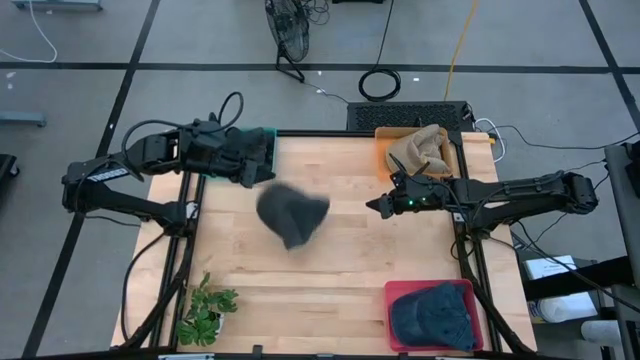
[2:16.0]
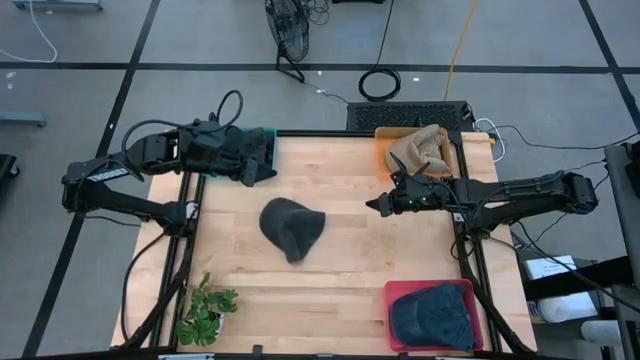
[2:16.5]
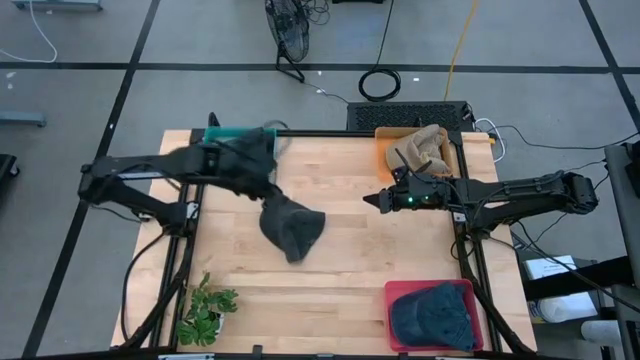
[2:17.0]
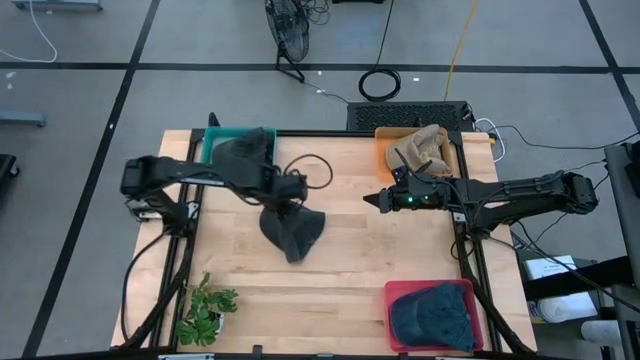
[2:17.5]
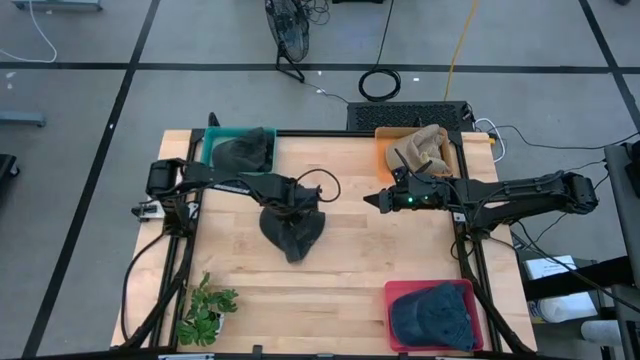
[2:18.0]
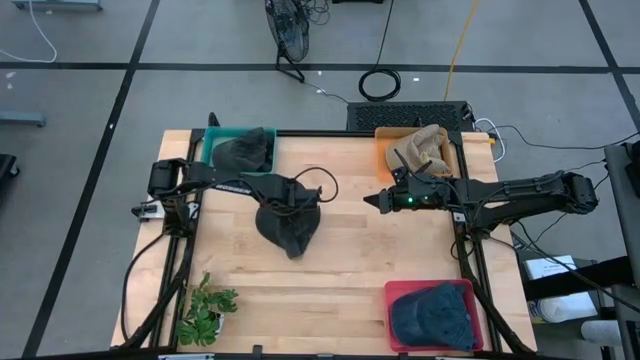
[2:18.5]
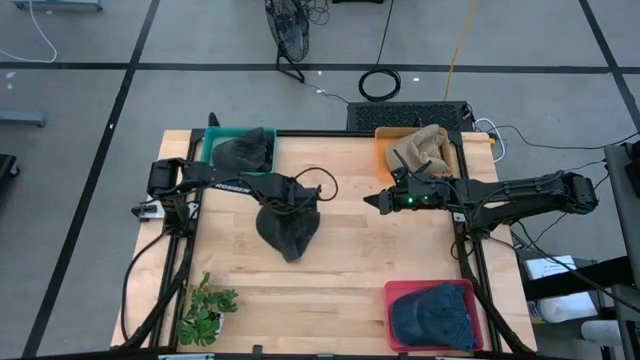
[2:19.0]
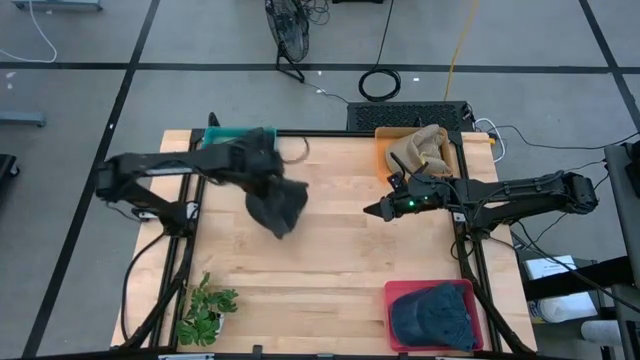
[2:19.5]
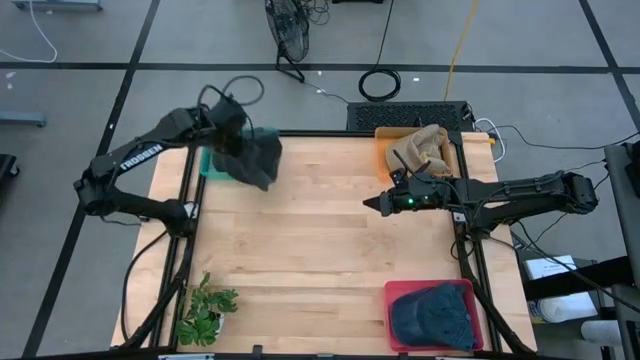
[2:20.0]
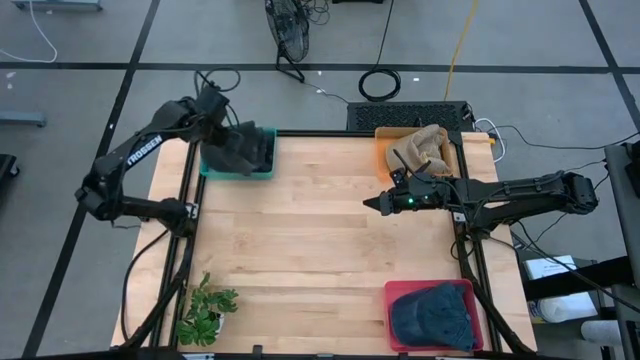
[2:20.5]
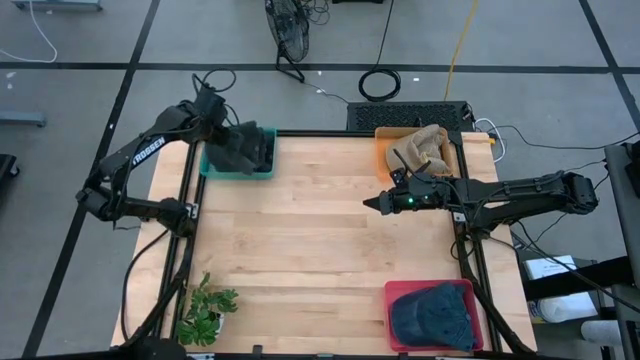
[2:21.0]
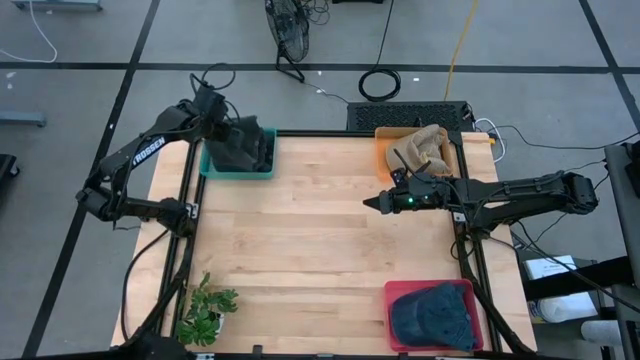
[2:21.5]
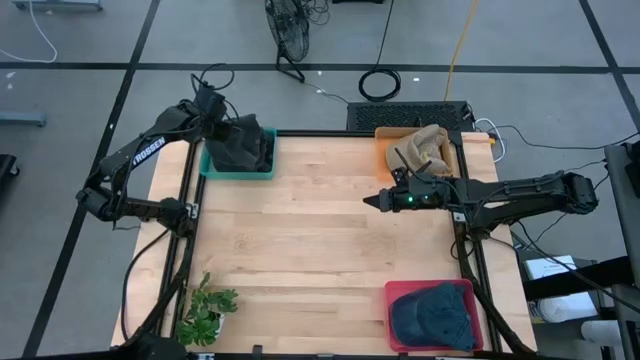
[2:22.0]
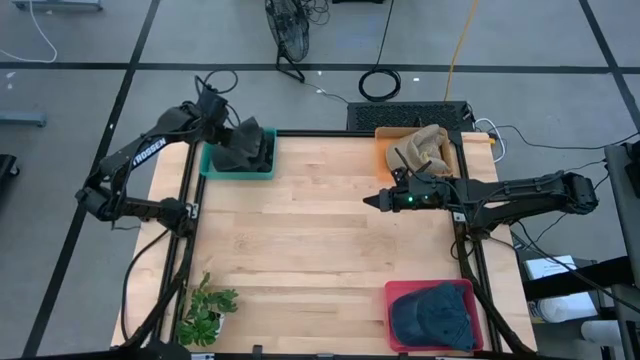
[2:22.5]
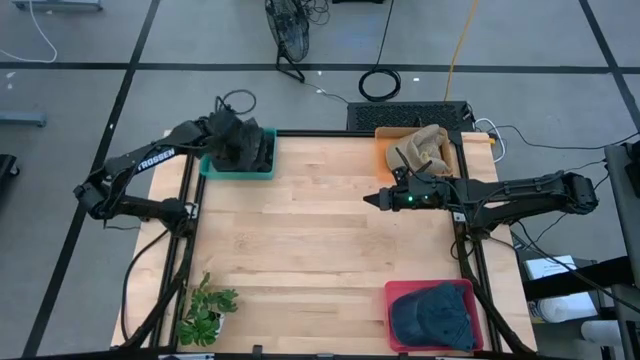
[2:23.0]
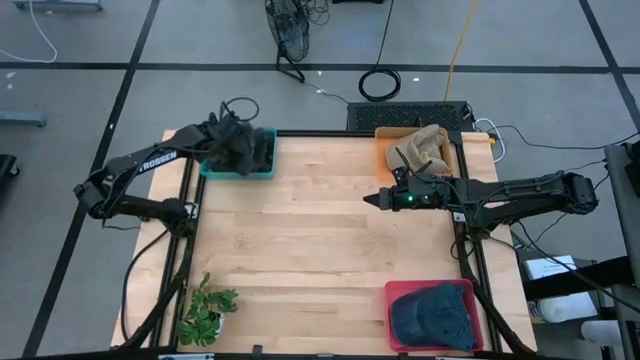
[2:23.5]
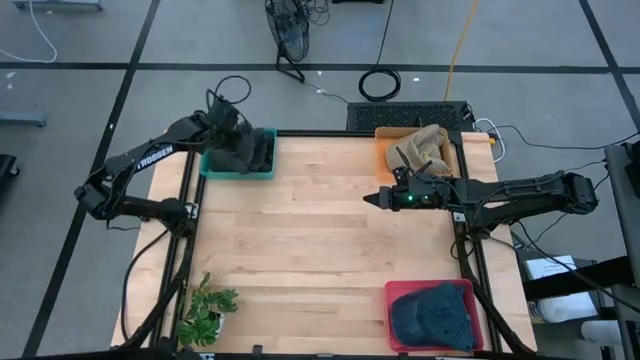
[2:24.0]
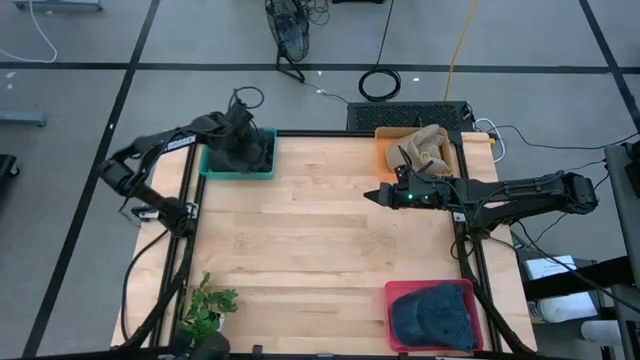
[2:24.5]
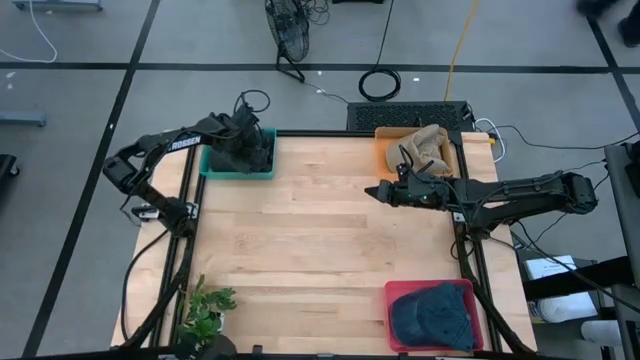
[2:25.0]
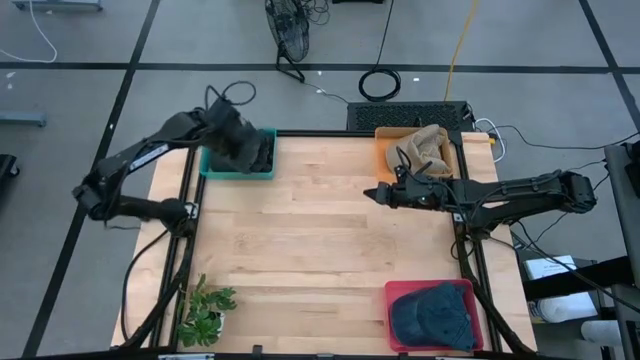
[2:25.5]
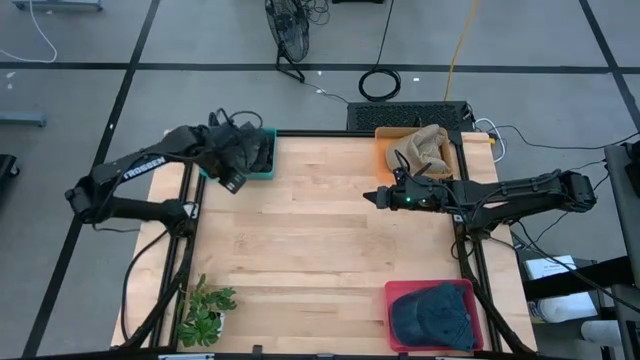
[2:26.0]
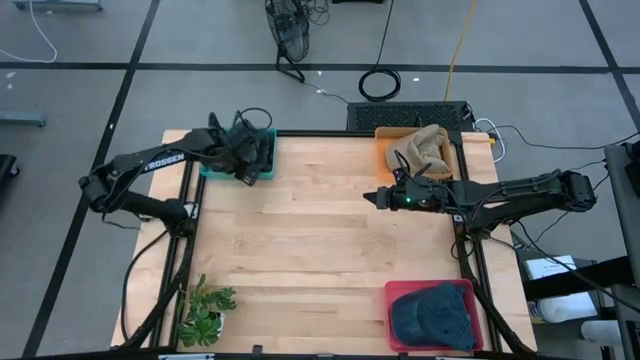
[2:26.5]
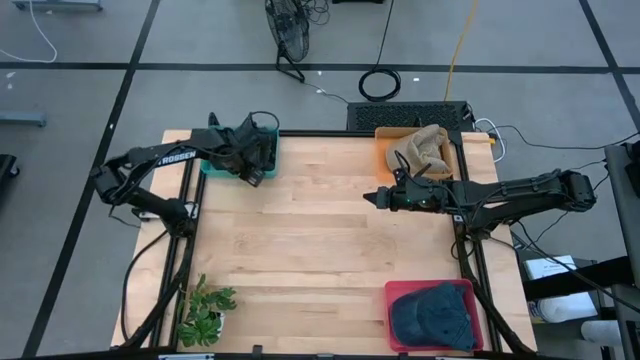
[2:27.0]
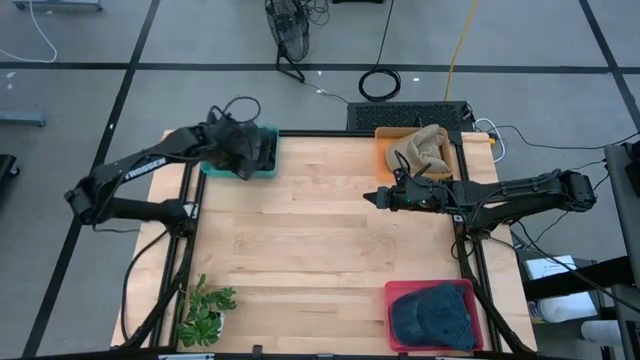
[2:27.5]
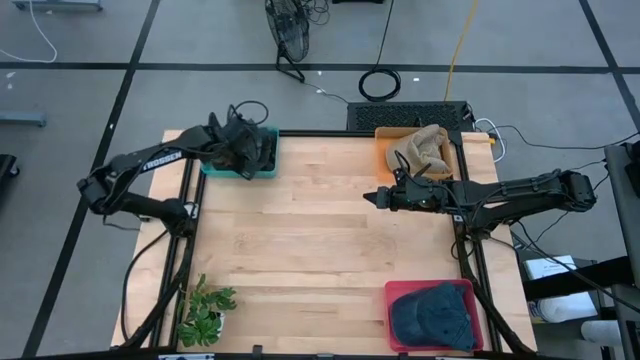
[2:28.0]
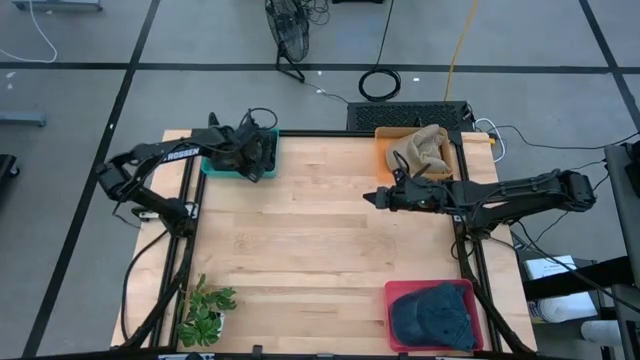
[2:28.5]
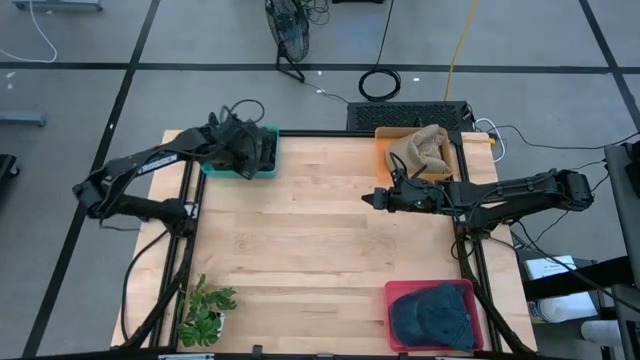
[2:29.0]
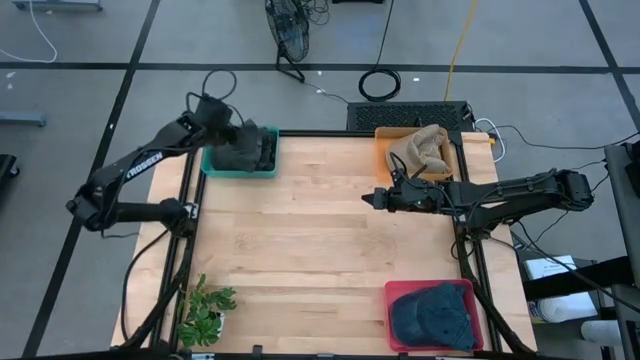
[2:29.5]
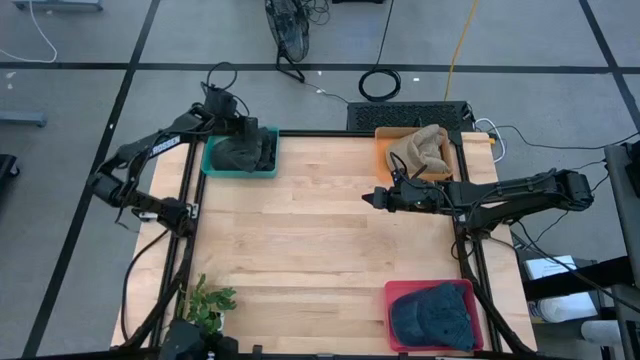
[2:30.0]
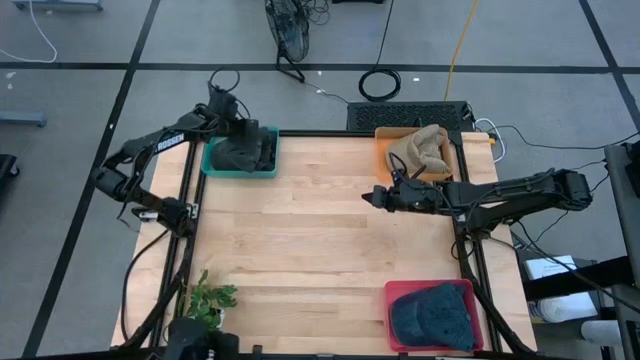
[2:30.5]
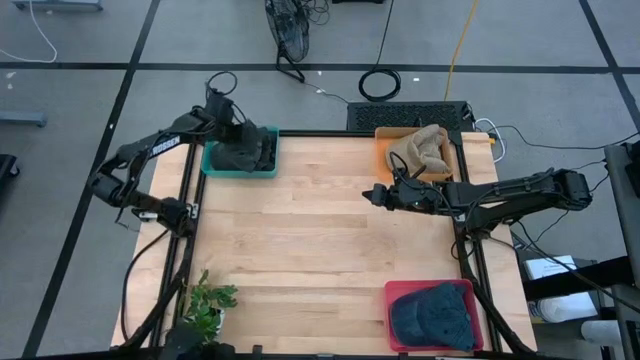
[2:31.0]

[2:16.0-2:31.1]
Task: Pick & Place hat
Put the black cap into the green bin

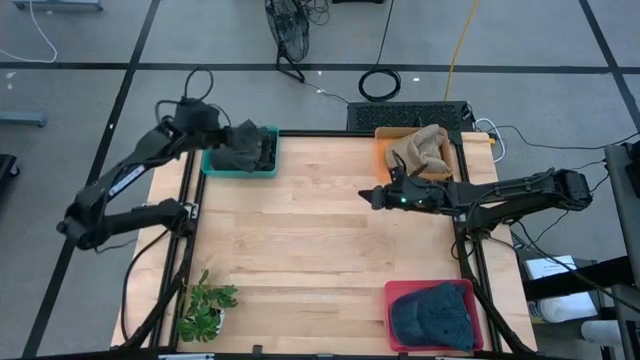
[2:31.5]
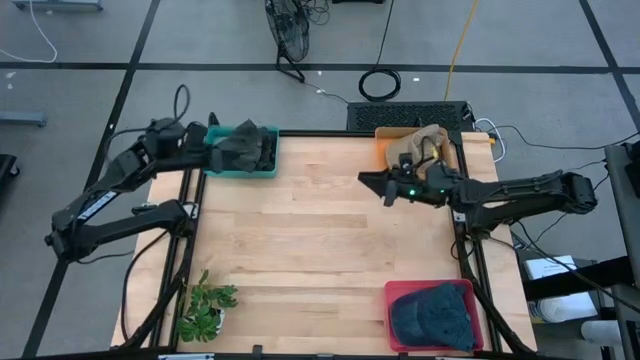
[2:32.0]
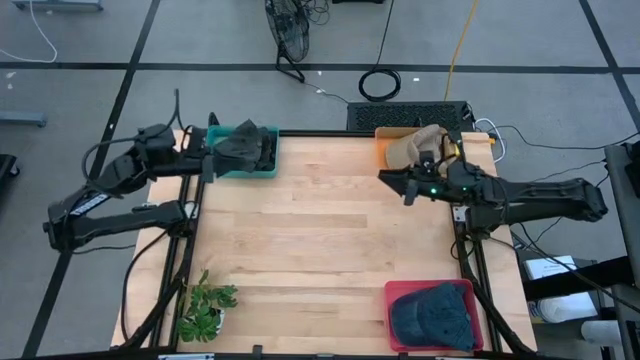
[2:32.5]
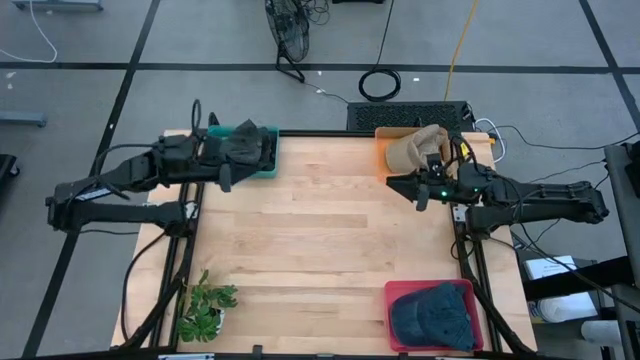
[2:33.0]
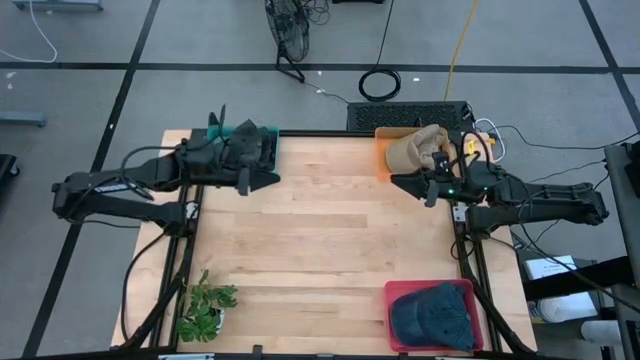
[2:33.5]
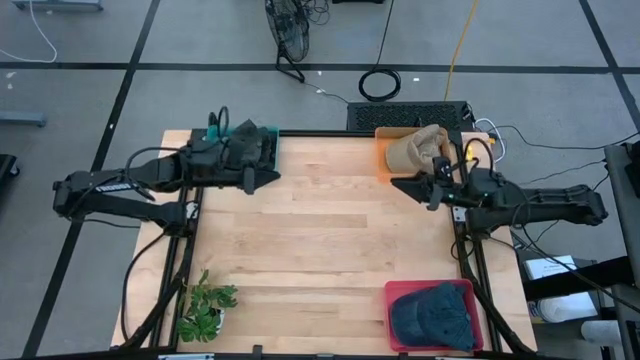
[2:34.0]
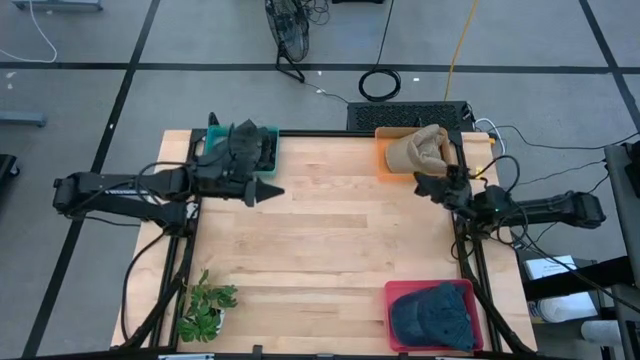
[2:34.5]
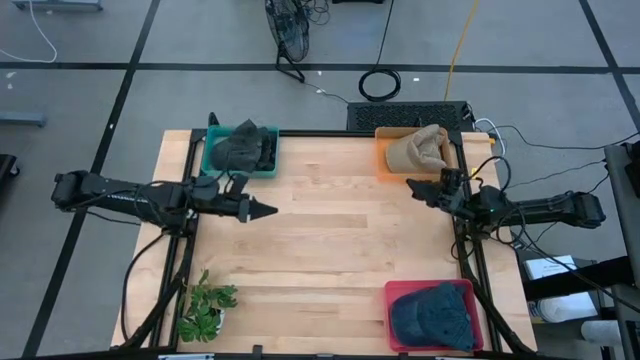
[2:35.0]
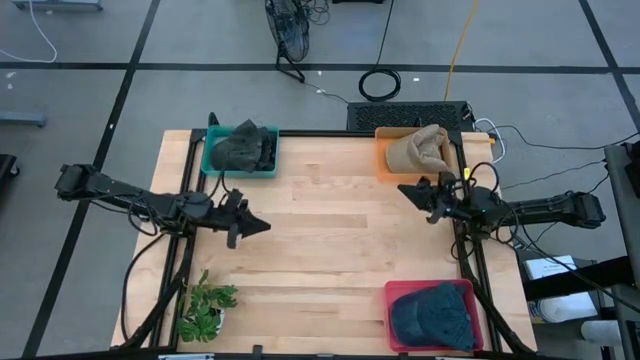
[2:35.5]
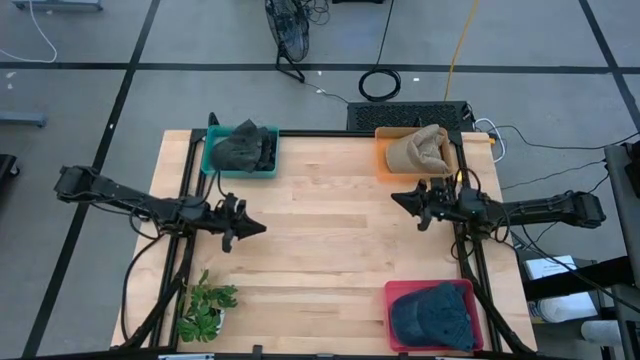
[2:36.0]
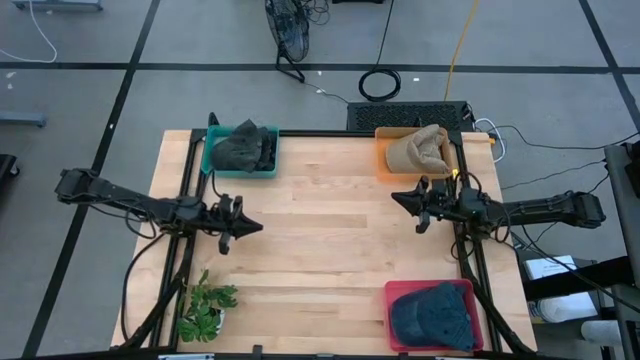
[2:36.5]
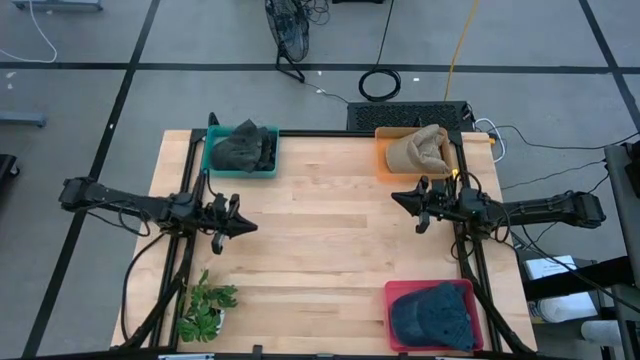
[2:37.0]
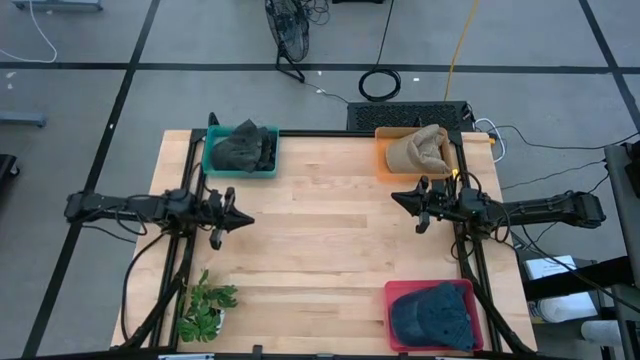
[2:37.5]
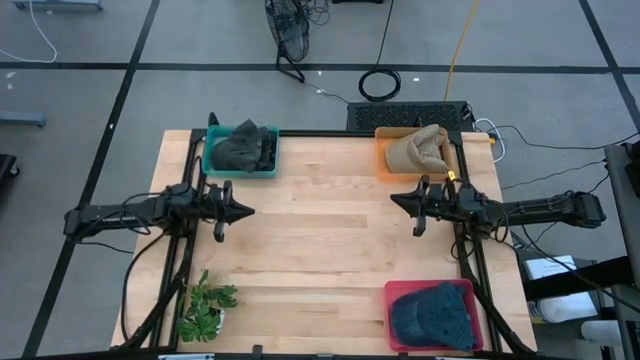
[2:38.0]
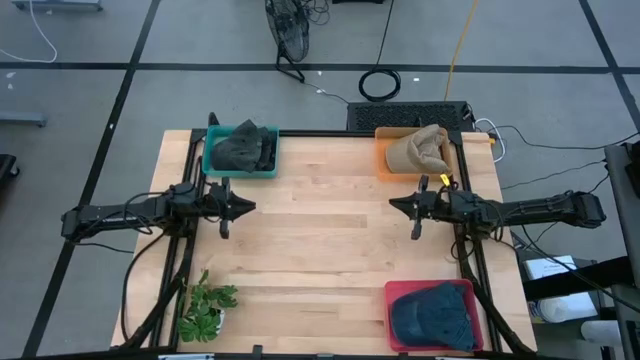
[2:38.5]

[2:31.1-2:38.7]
Return to Home Position
